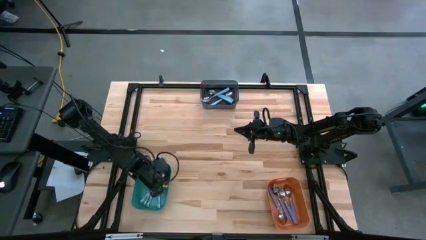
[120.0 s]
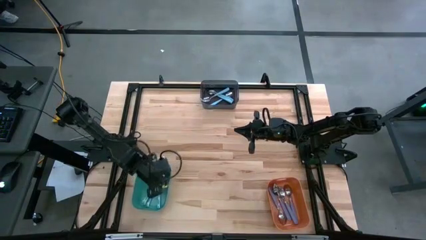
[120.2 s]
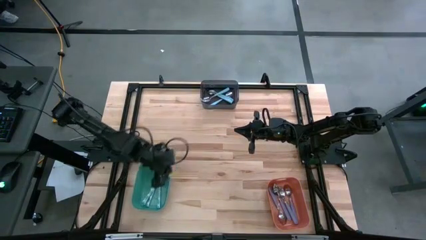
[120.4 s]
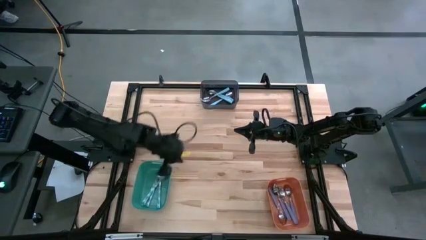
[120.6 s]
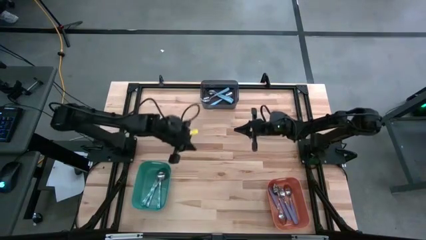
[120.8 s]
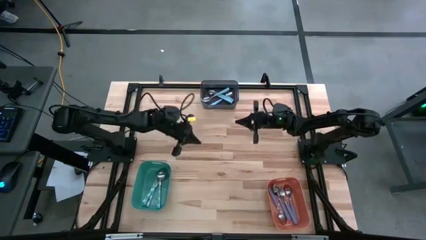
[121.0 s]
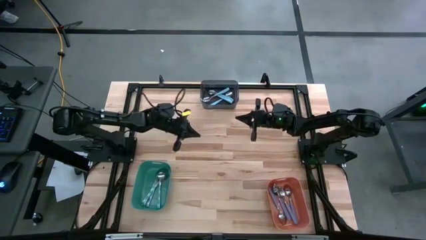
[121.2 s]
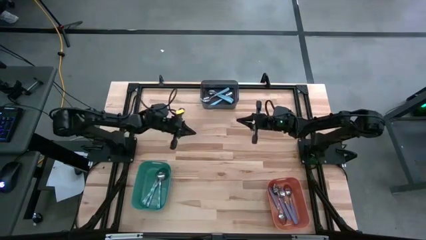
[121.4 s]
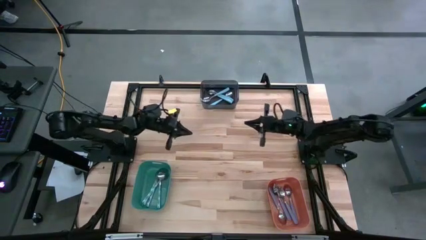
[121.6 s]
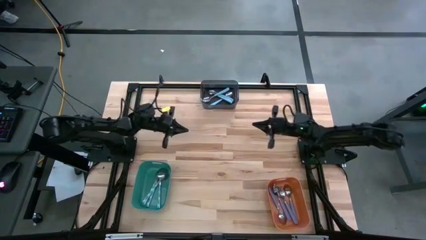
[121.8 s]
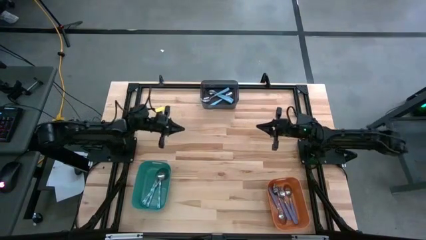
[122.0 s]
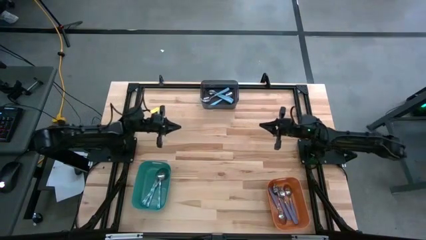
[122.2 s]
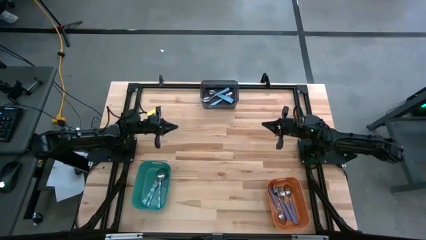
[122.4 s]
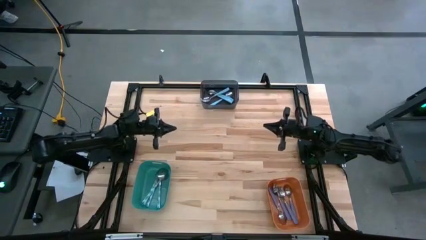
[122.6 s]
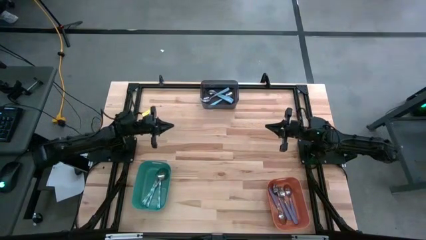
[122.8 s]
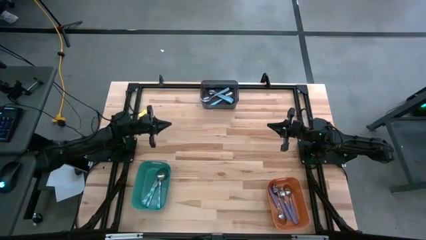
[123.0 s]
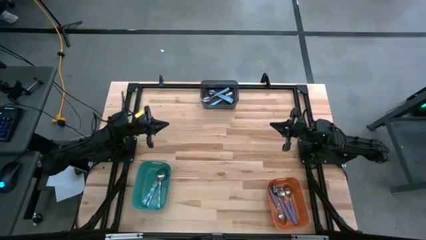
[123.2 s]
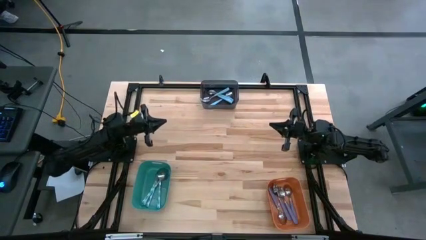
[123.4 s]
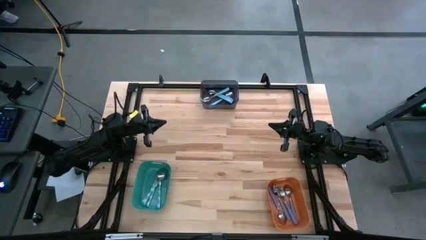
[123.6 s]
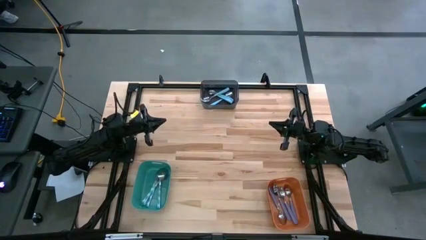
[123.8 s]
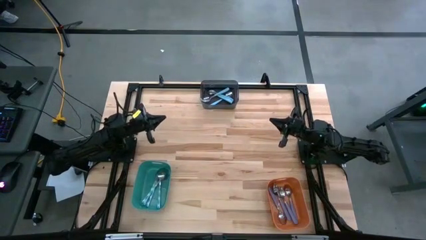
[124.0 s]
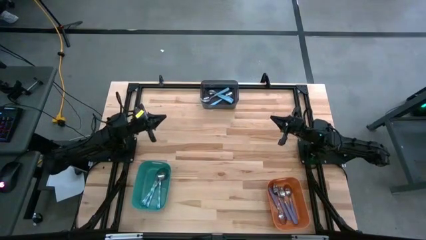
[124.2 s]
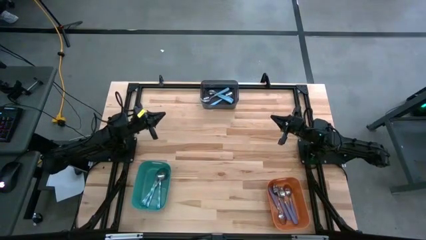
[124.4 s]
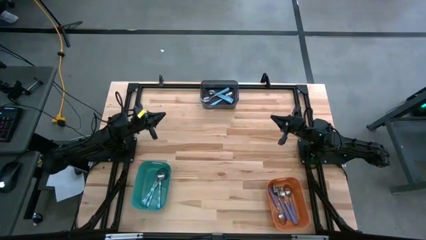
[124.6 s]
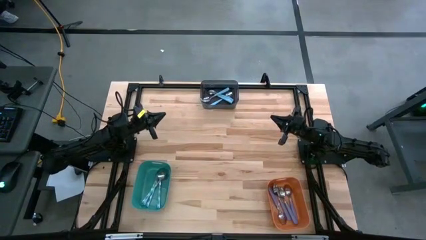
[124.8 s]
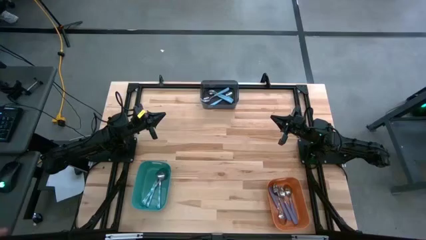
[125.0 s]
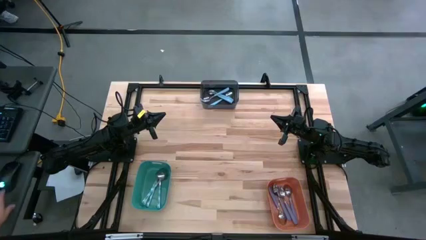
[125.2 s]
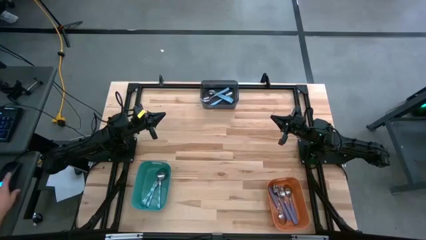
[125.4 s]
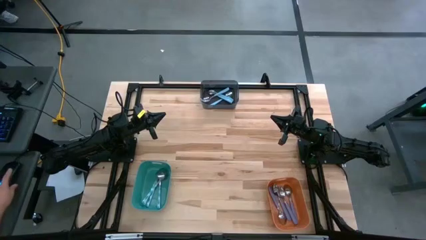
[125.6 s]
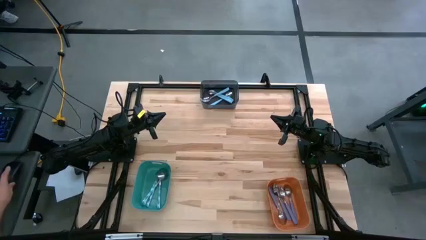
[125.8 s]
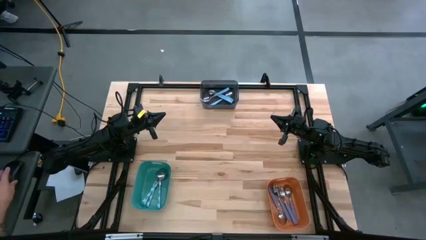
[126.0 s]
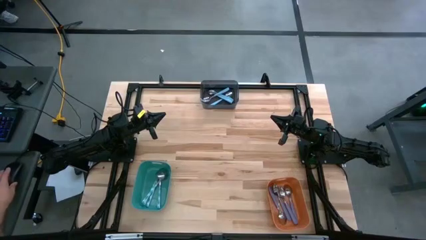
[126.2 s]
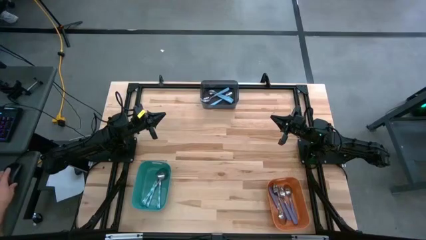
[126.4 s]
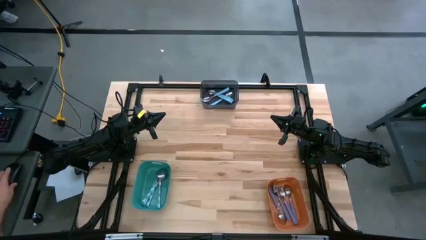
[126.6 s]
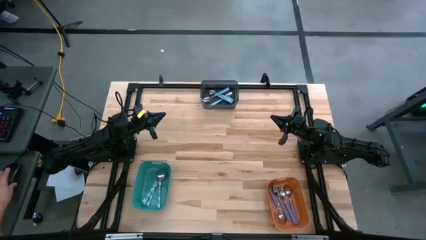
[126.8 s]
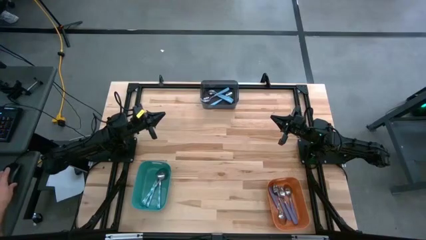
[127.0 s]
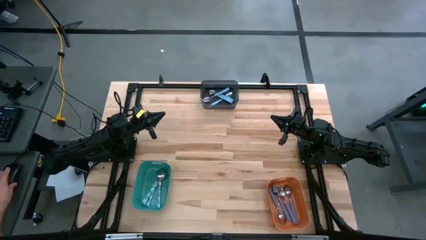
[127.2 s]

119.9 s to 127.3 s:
Task: Sort silverware by color (type)
Return to Home Position

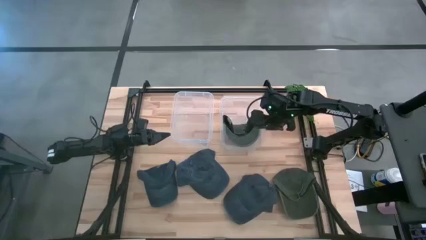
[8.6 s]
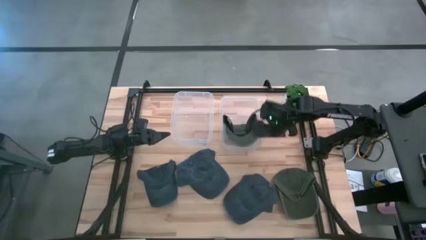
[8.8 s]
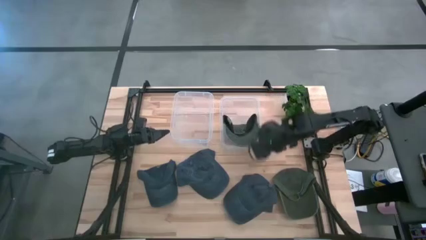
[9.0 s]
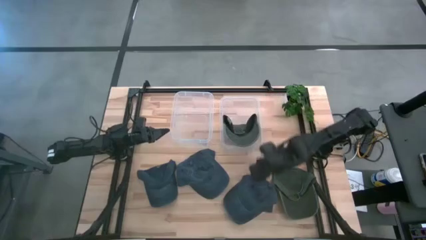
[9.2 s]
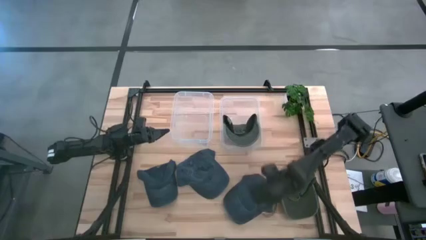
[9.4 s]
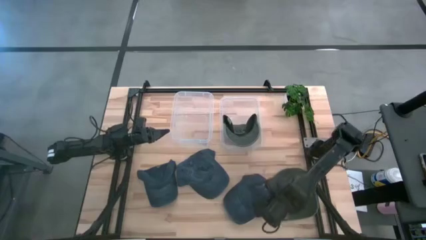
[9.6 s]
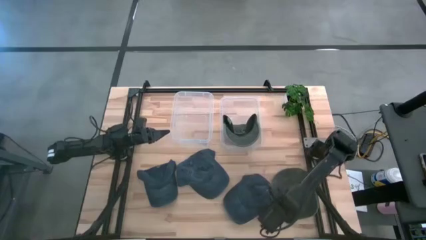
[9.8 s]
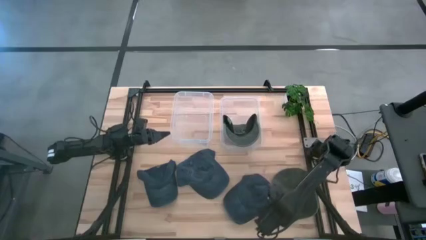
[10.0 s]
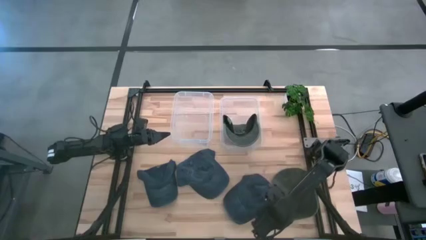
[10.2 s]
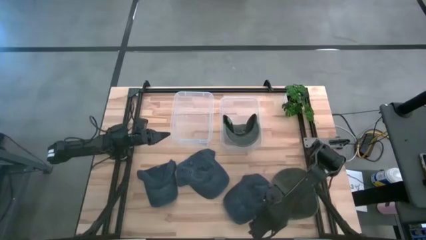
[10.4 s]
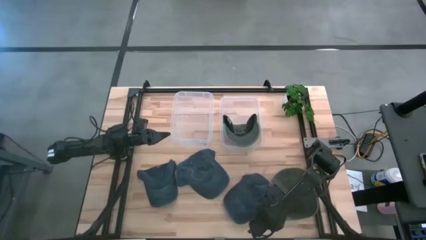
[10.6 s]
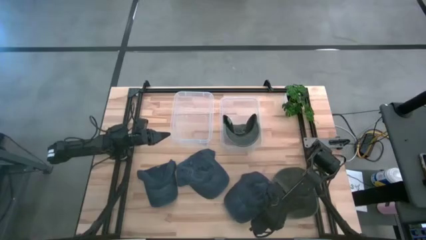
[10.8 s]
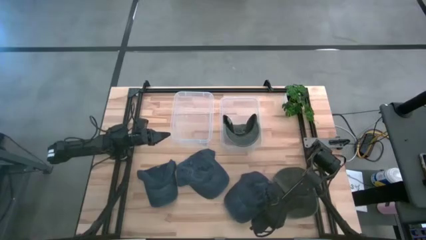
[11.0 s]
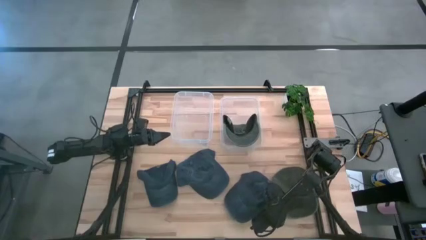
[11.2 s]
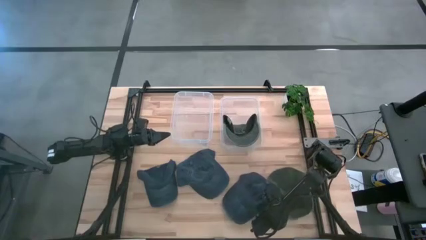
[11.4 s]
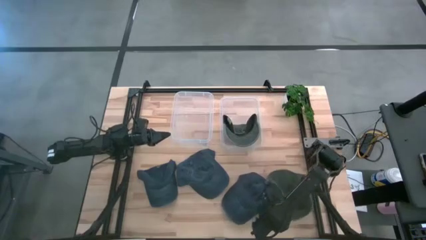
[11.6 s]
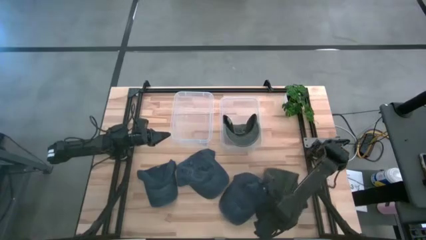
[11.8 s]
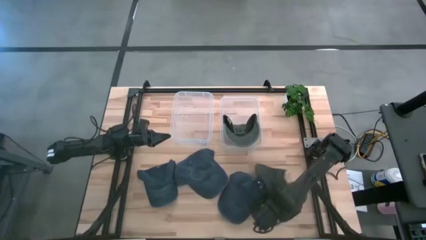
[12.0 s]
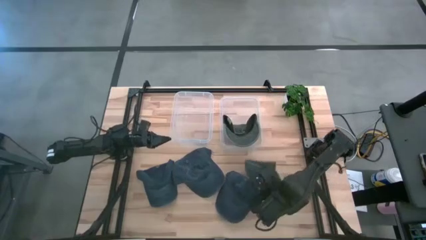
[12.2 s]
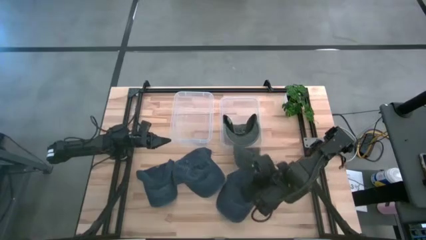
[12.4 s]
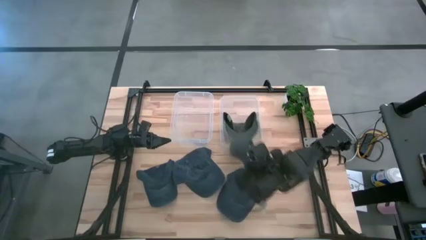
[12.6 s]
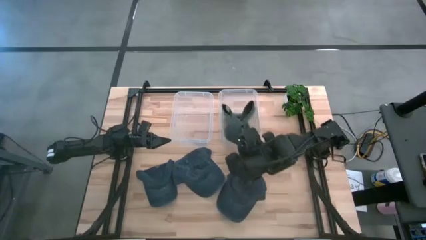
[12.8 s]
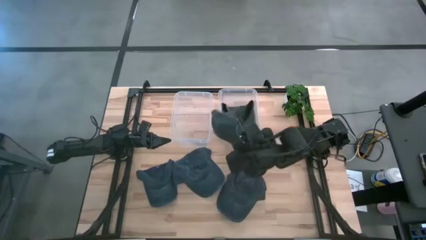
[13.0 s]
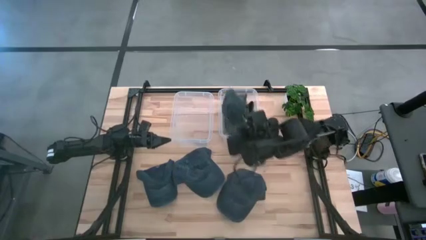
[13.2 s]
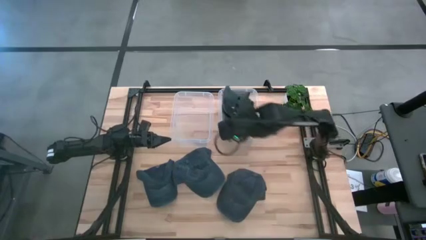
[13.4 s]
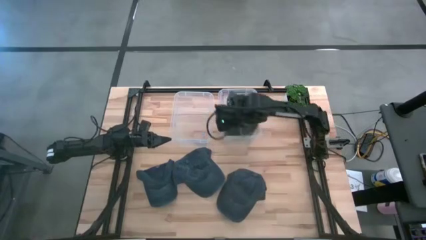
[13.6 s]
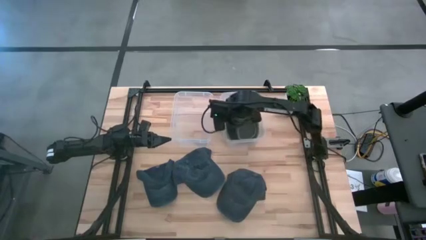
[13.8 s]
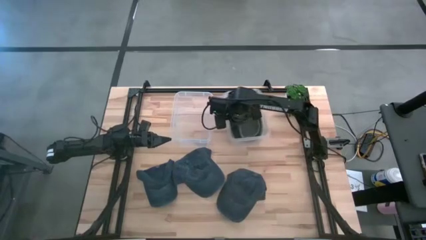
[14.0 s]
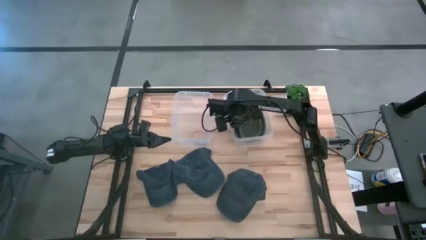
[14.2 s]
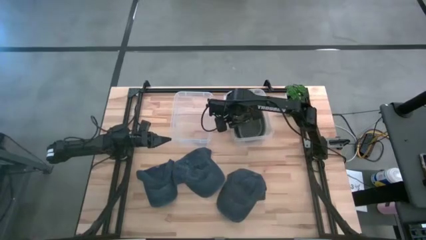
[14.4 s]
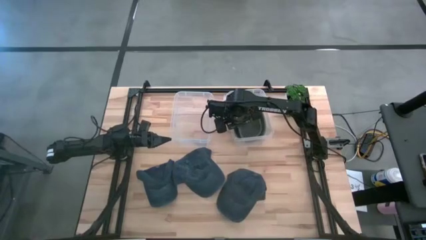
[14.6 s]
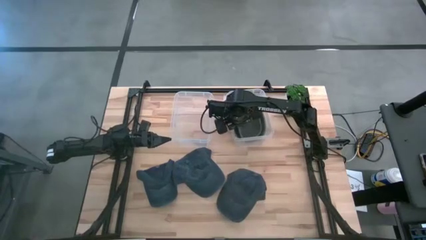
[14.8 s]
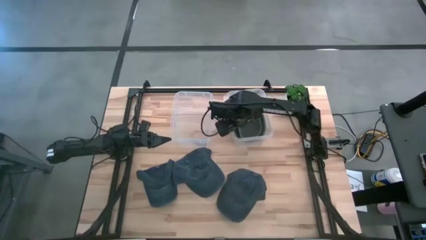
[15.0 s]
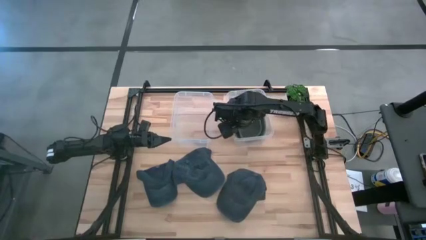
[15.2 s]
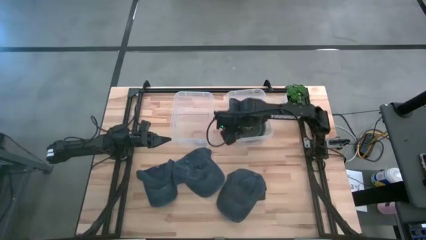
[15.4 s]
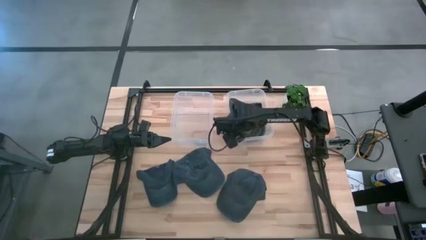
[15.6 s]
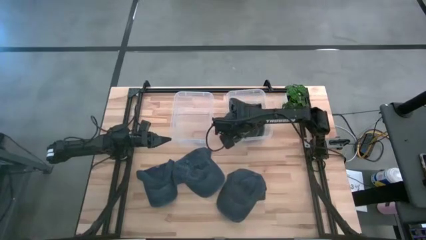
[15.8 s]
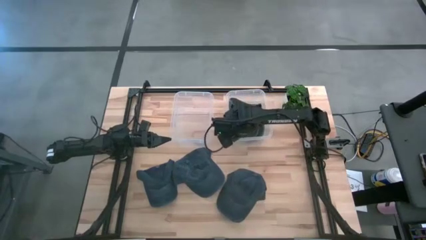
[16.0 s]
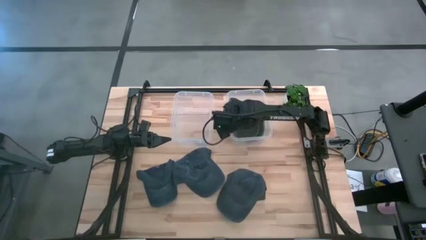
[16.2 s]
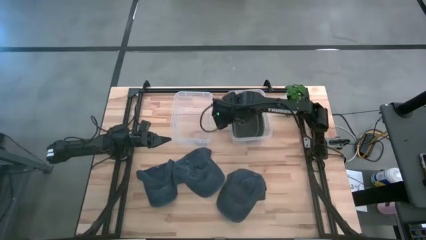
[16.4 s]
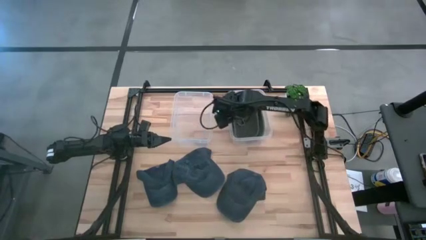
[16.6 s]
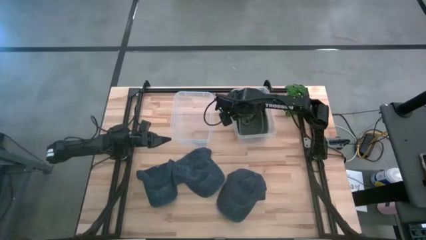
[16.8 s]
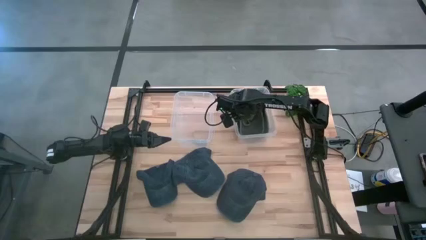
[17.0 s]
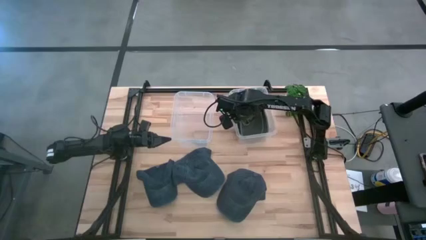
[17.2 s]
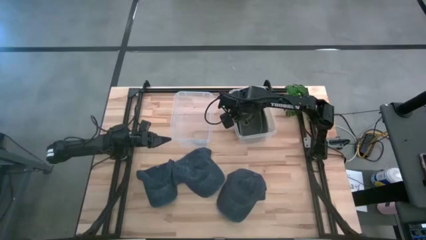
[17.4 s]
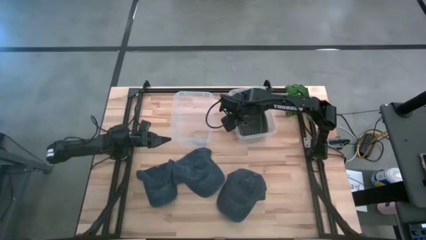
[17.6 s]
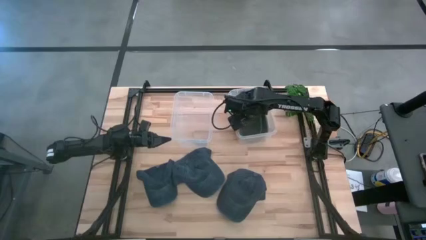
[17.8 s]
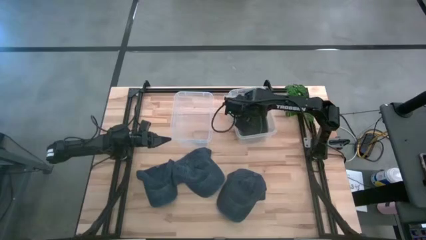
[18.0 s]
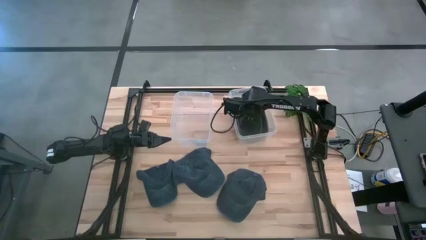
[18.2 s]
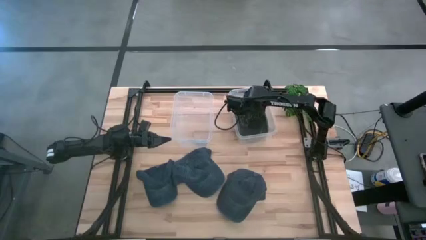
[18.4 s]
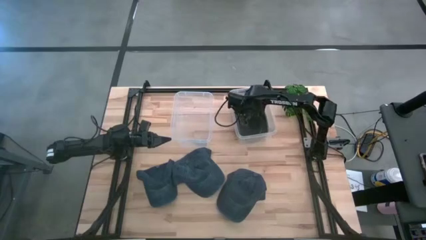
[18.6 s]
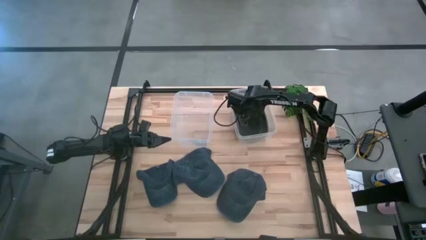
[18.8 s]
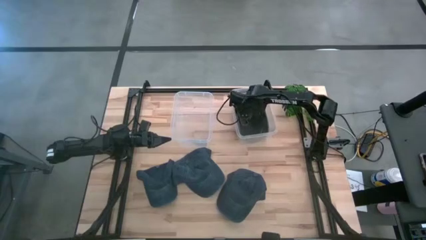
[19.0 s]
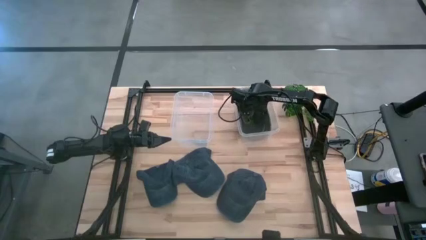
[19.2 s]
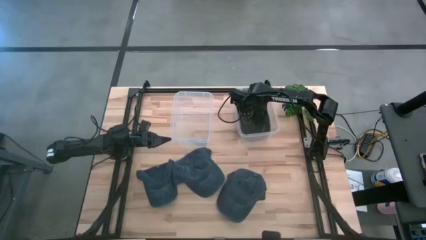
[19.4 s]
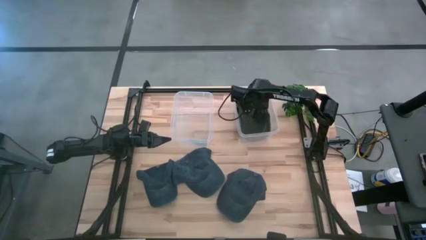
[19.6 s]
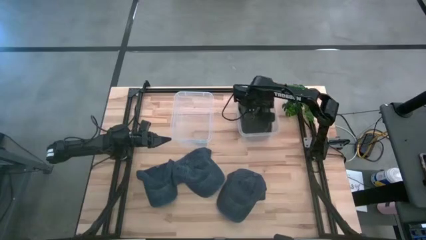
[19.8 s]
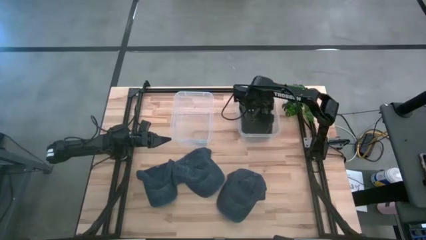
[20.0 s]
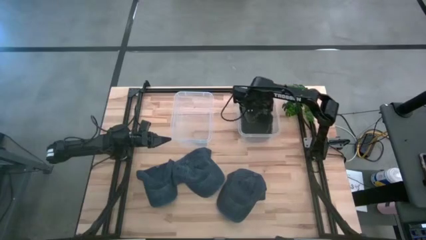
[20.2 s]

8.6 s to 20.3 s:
Task: Pick & Place hat
Put the green cap into the right transparent bin
